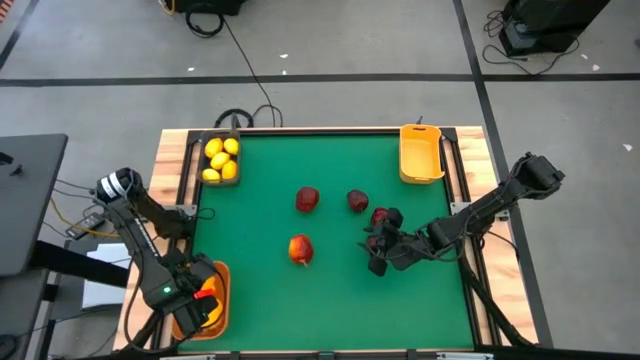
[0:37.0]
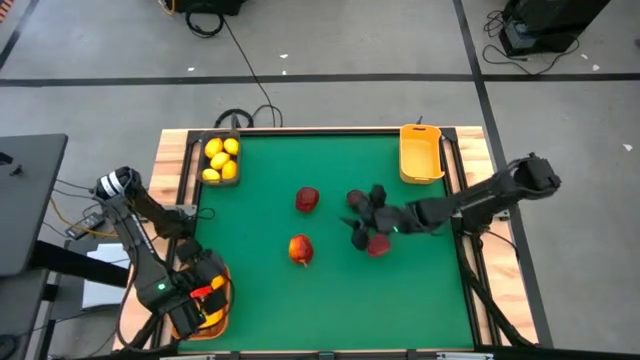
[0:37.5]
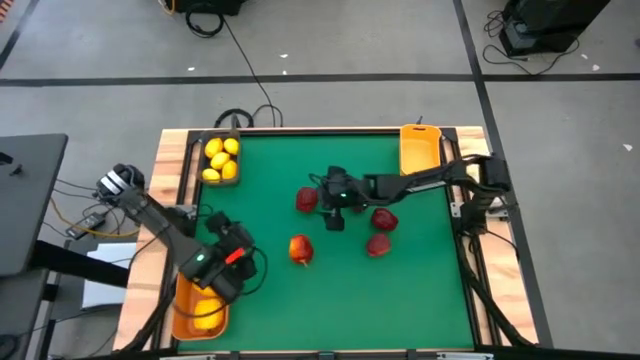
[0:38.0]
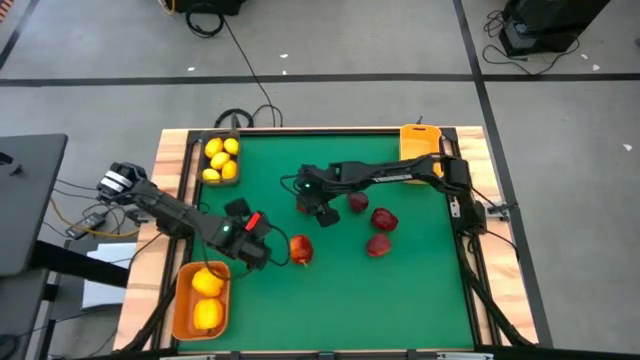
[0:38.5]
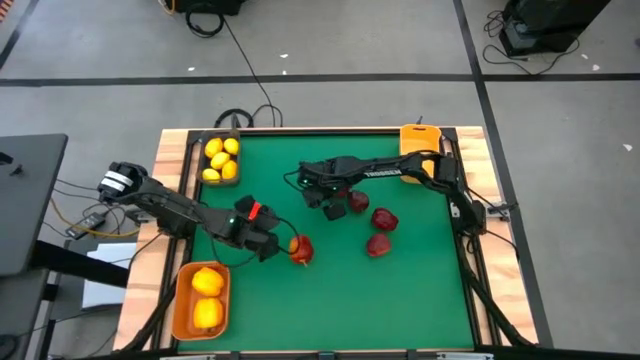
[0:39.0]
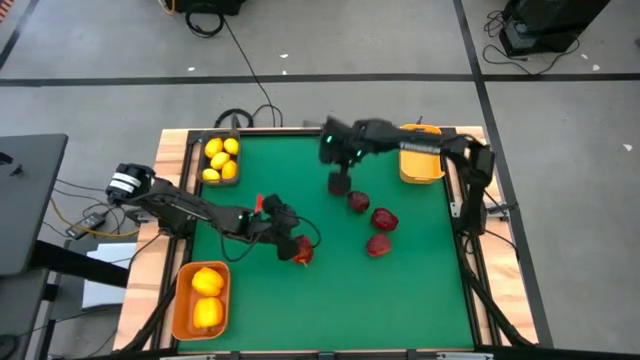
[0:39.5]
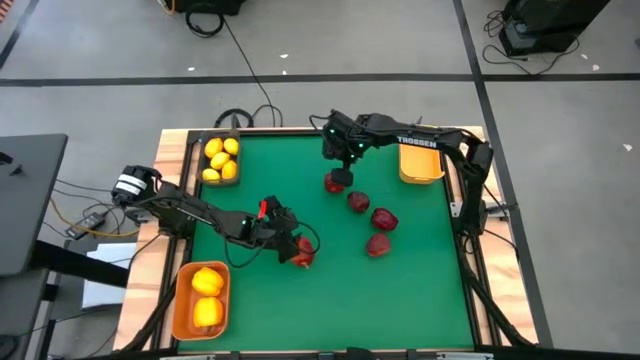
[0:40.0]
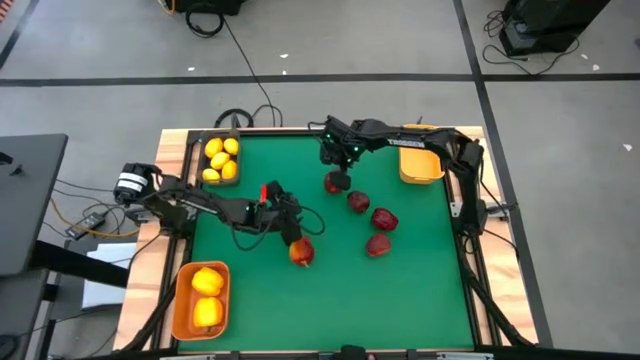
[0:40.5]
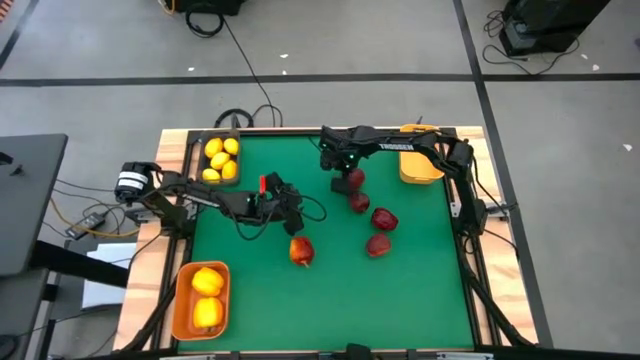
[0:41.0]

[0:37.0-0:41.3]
Task: Sort produce into baskets
Put the apple into the yellow bin

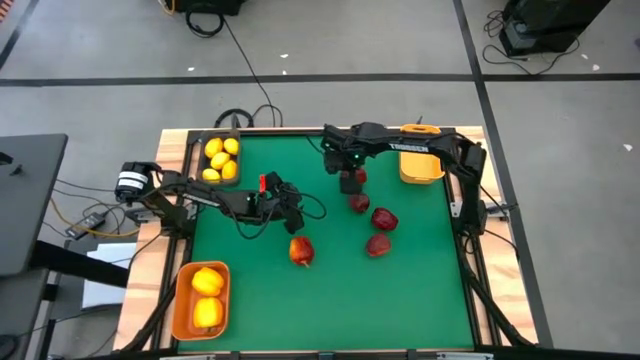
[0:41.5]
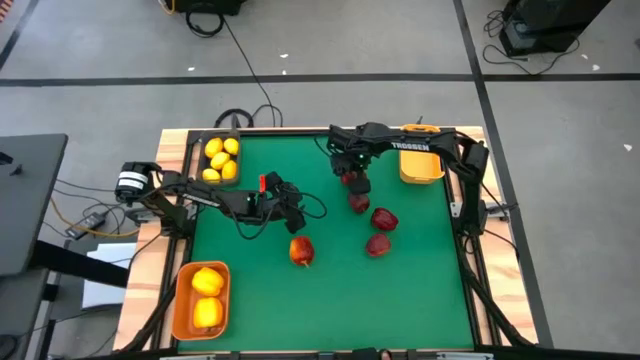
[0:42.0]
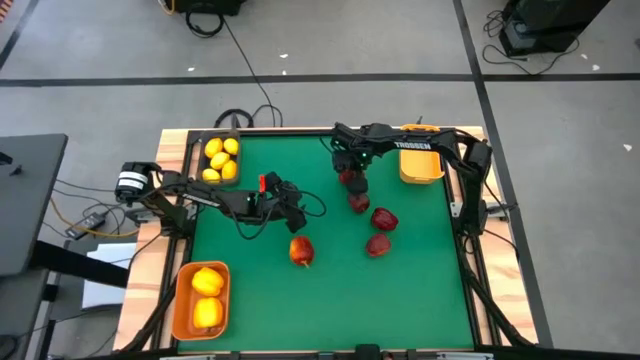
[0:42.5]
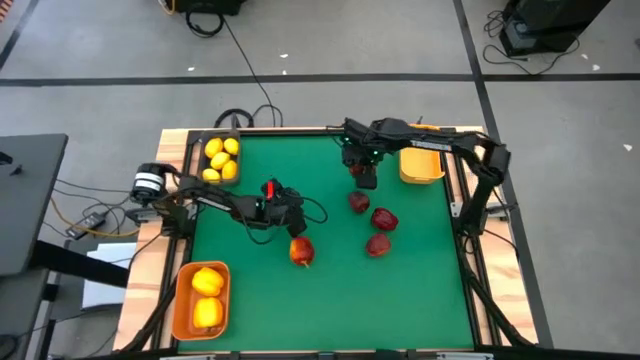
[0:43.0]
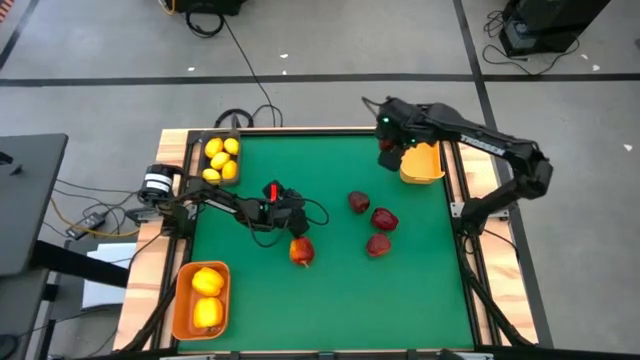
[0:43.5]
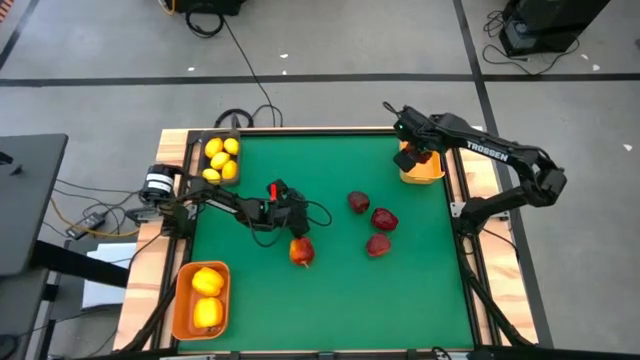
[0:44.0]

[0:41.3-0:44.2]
Put the apple into the yellow bin

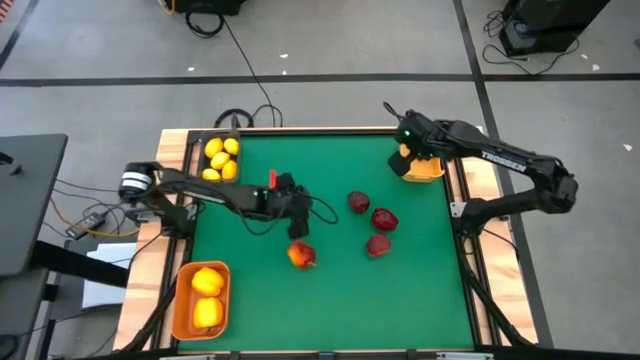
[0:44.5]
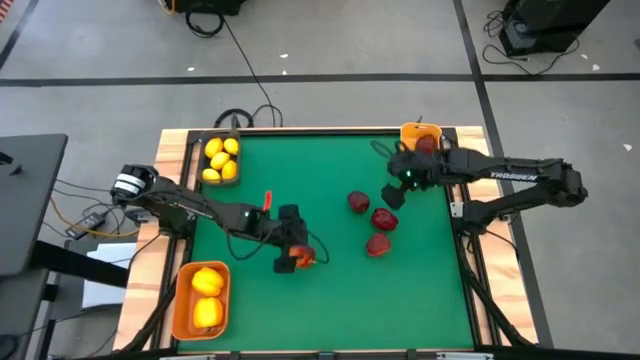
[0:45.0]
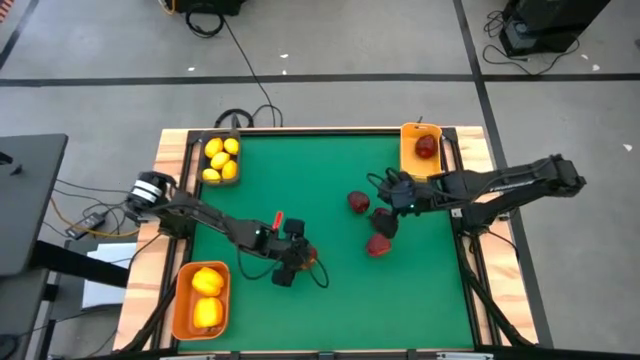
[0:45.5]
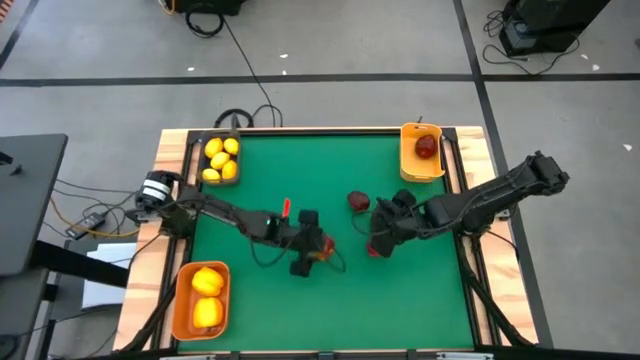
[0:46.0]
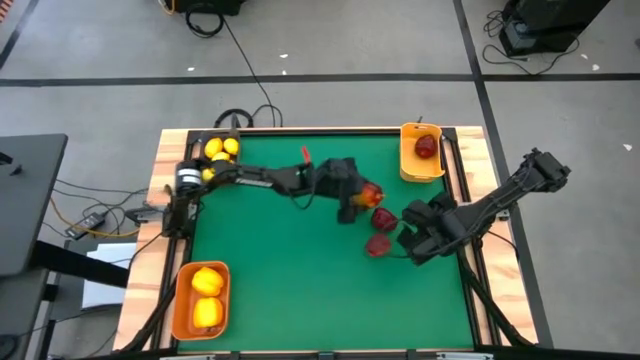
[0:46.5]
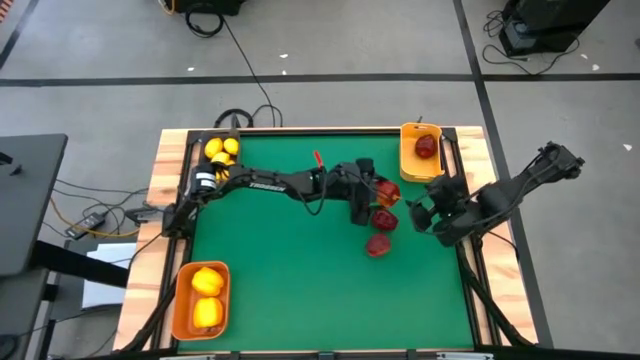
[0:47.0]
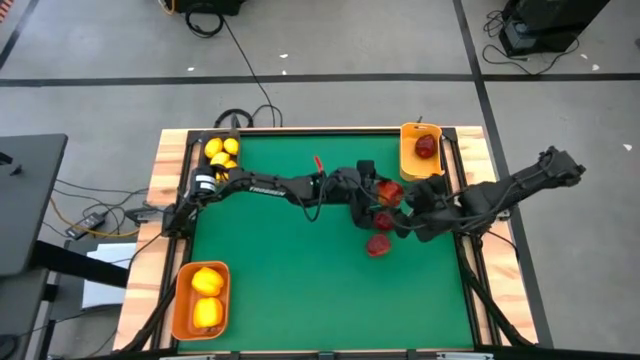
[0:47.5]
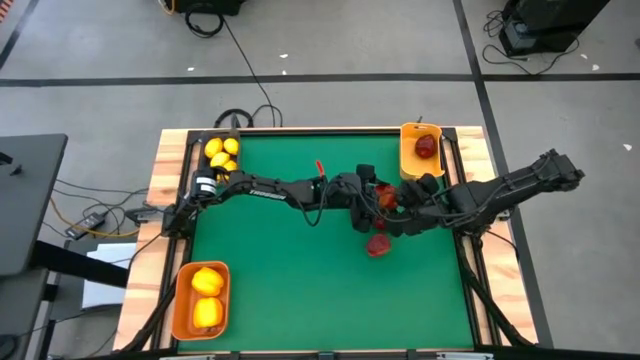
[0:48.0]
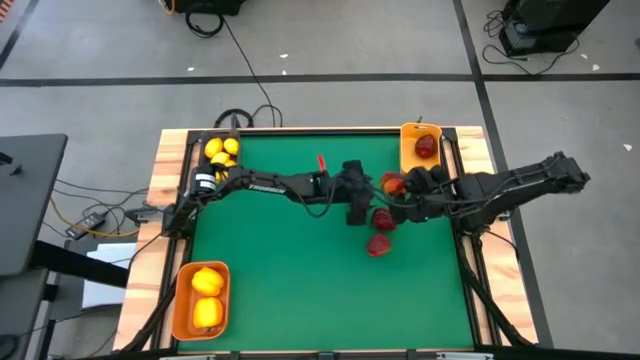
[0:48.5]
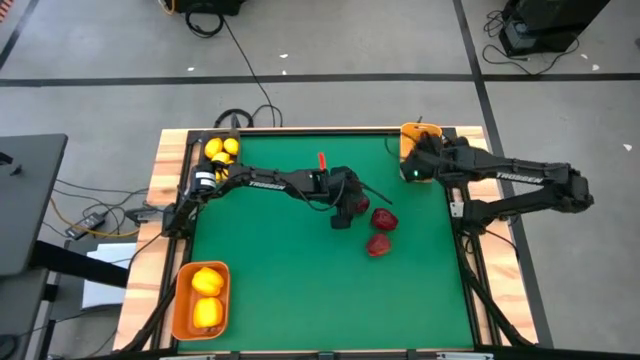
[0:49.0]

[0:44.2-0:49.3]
Put the apple into the yellow bin

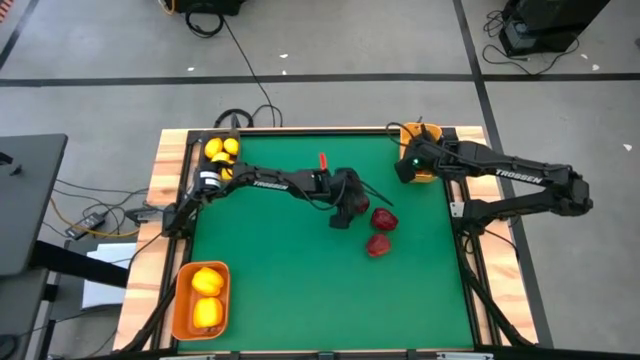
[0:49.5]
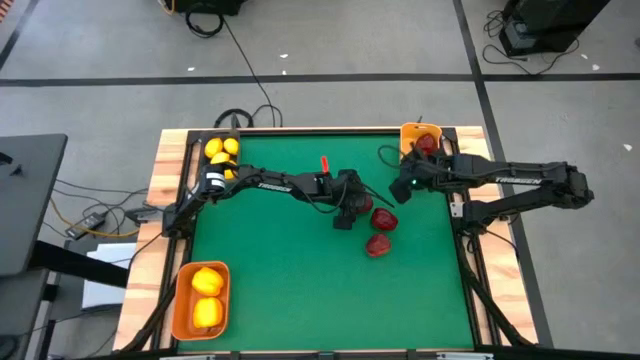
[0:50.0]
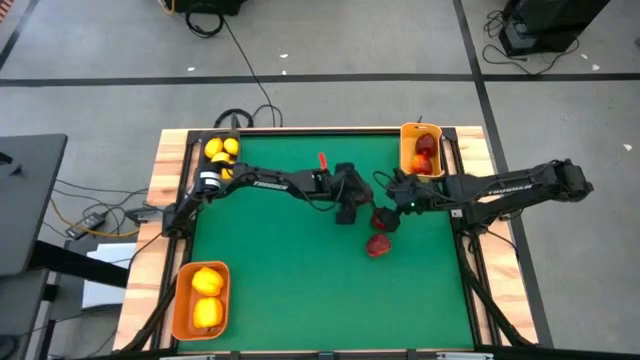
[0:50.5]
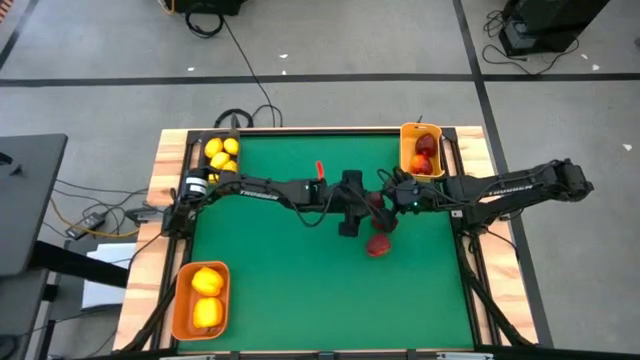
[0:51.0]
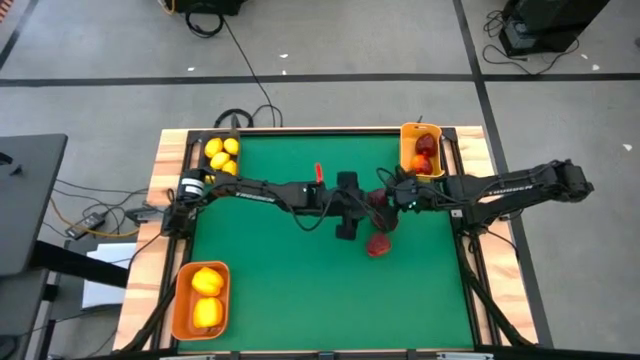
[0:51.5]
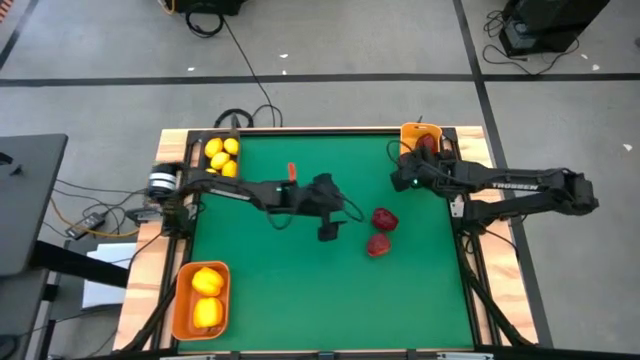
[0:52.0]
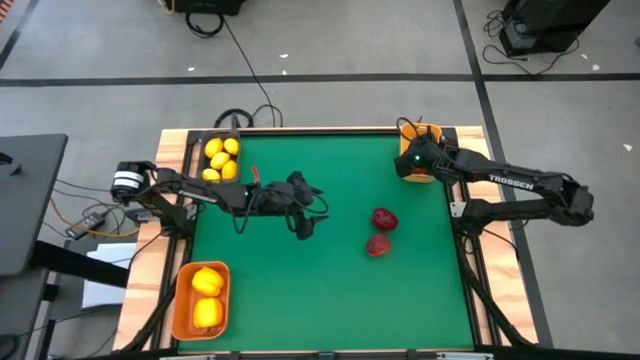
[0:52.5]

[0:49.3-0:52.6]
Put the apple into the yellow bin

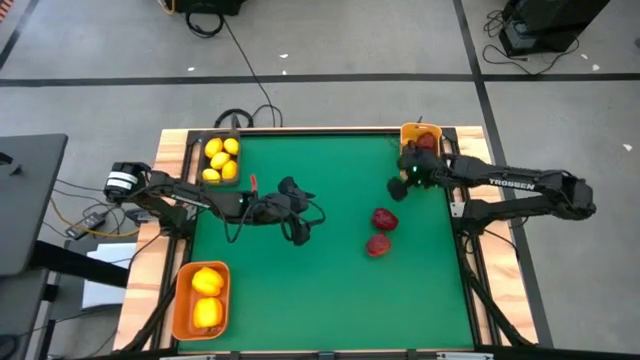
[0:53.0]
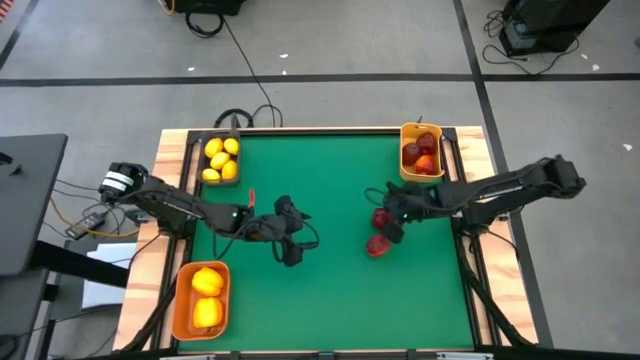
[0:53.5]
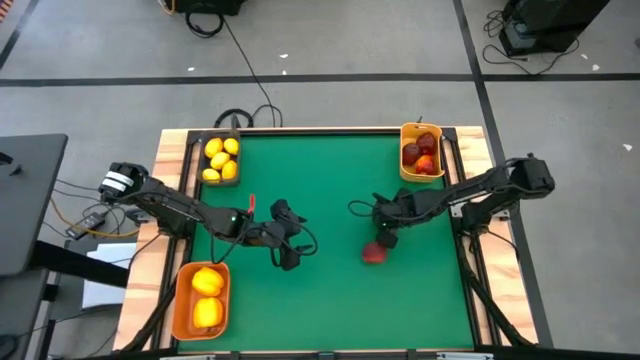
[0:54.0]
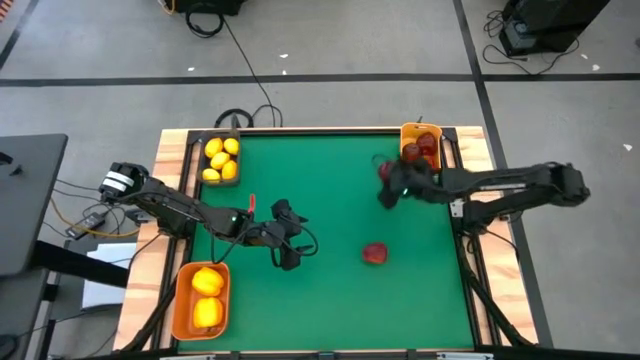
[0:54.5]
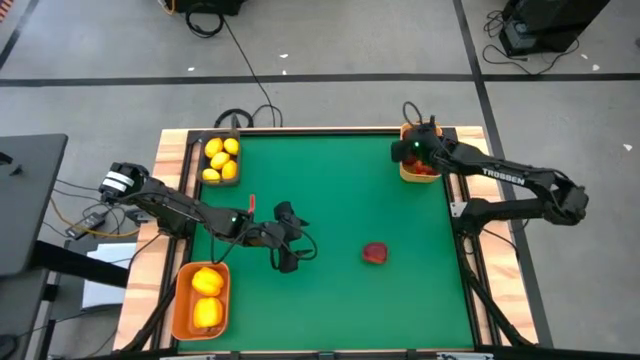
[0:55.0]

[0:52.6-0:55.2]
Put the apple into the yellow bin

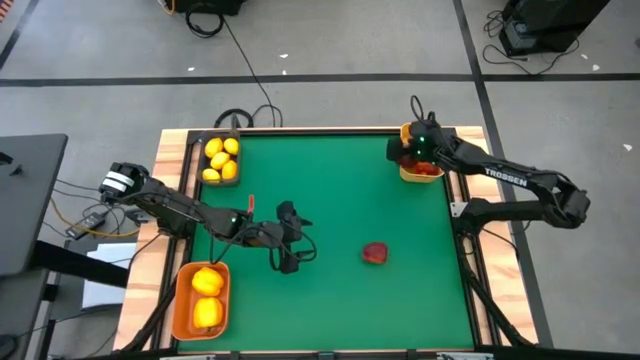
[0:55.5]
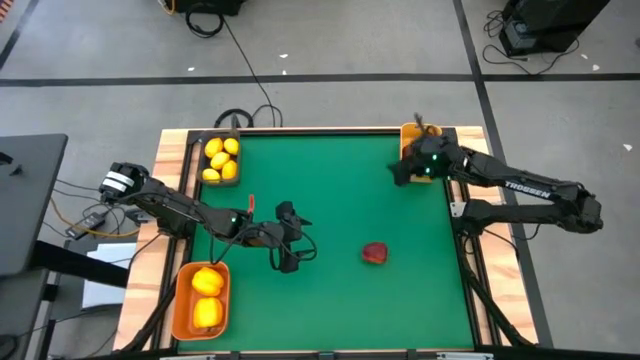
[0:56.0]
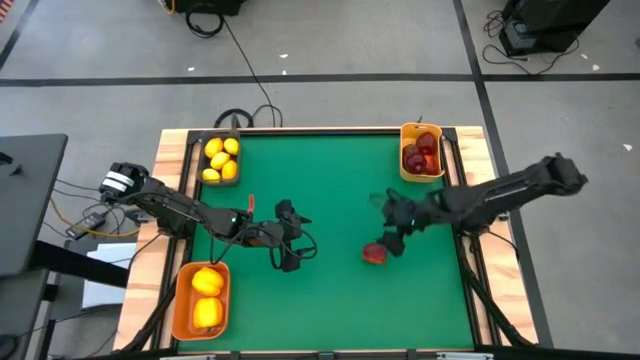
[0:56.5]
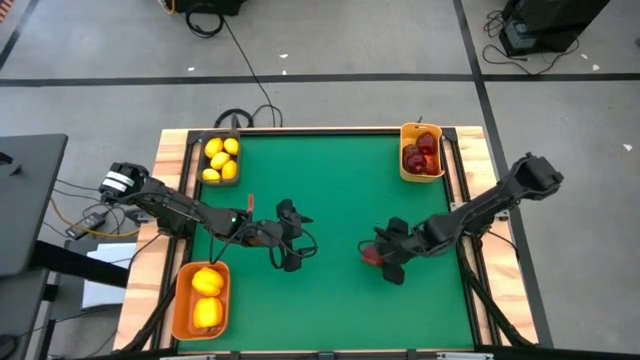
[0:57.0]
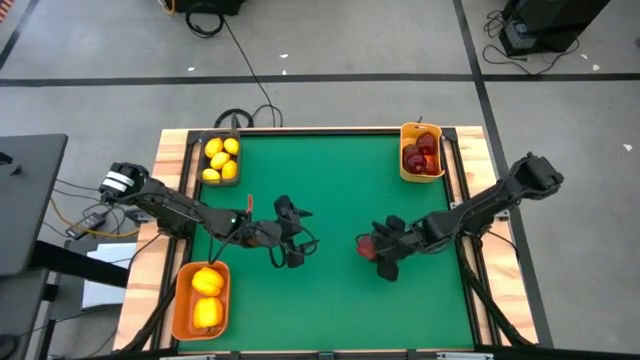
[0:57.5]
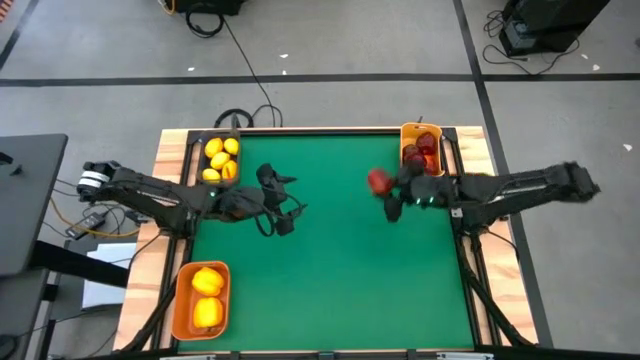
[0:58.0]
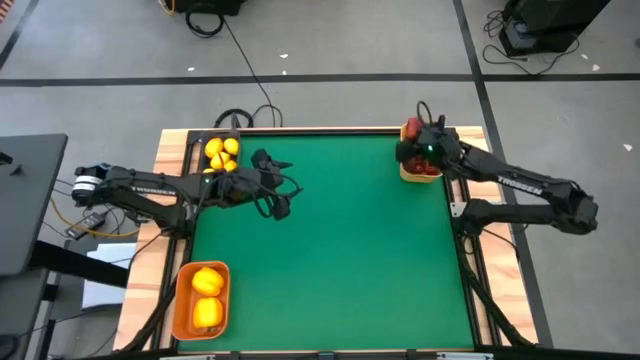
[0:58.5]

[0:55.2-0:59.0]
Put the apple into the yellow bin
